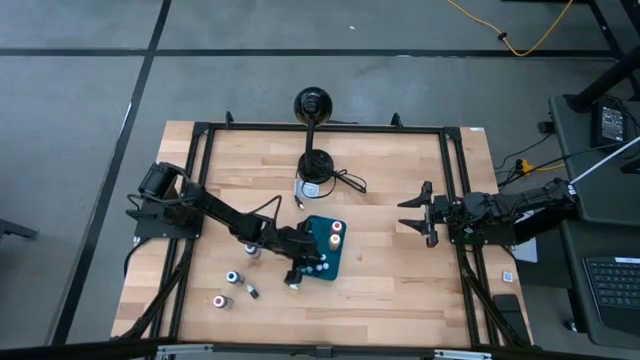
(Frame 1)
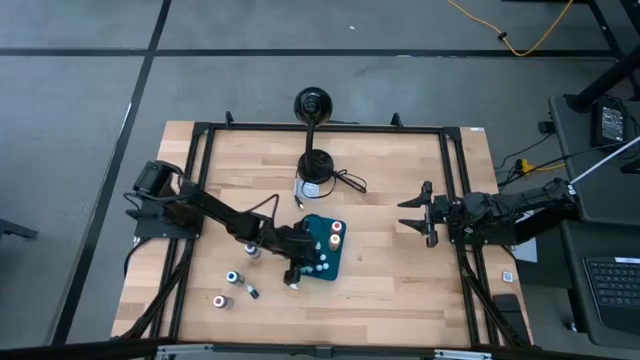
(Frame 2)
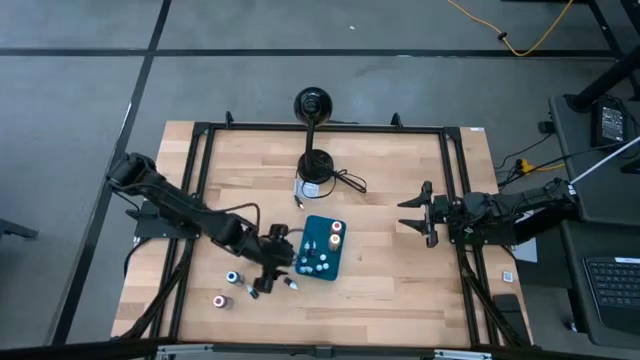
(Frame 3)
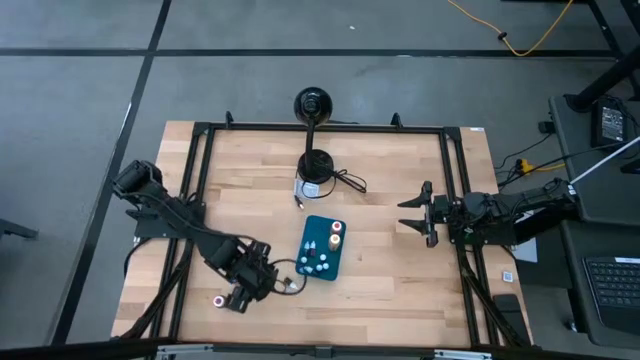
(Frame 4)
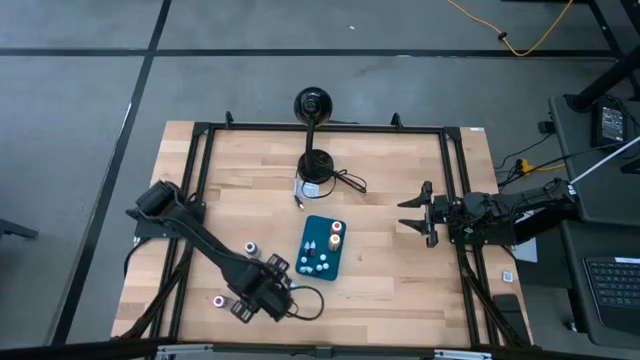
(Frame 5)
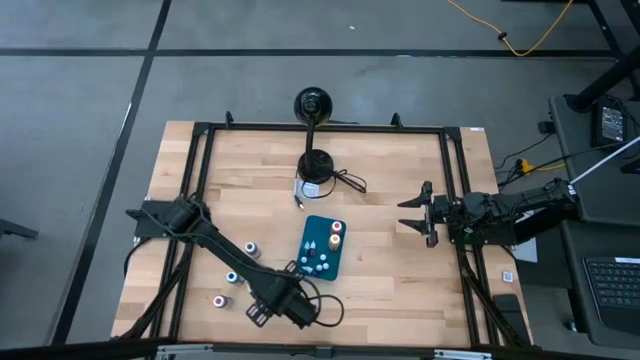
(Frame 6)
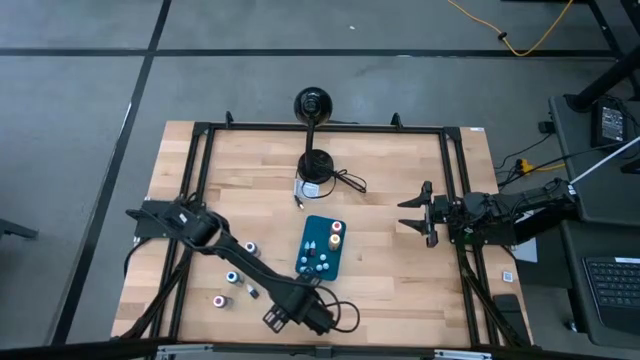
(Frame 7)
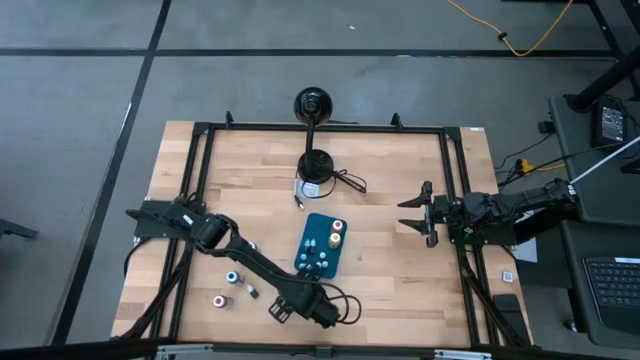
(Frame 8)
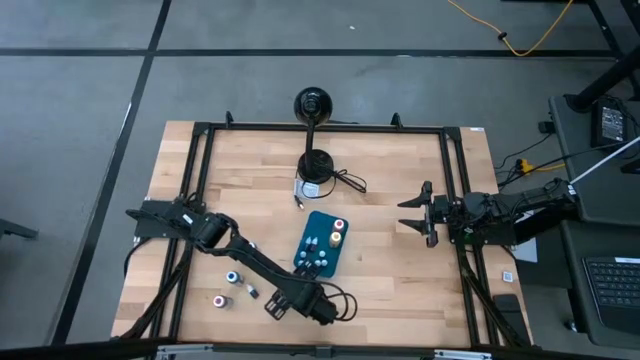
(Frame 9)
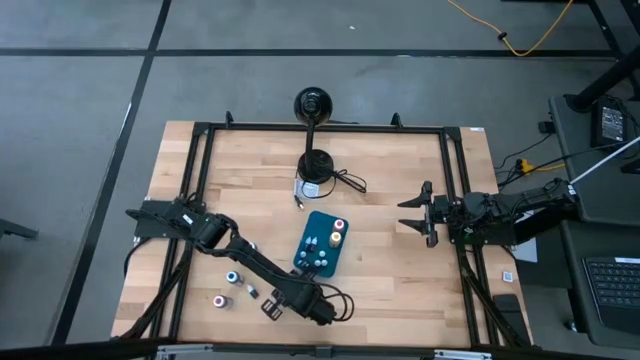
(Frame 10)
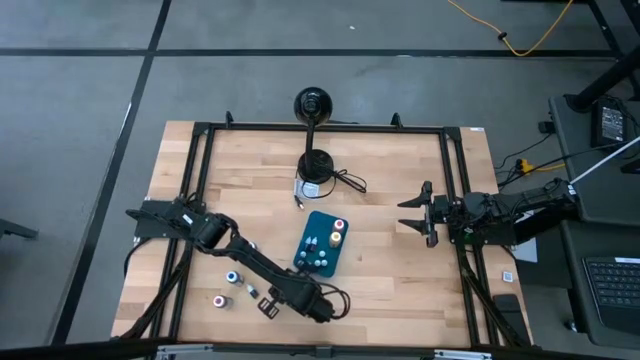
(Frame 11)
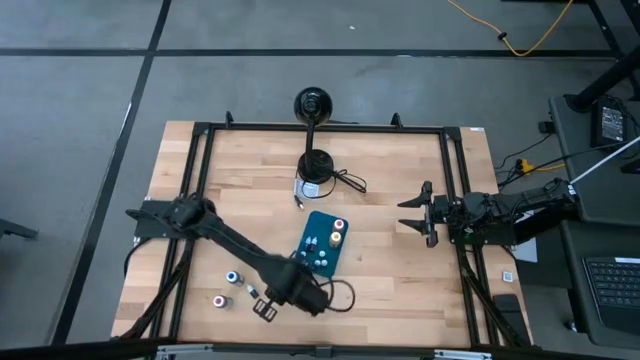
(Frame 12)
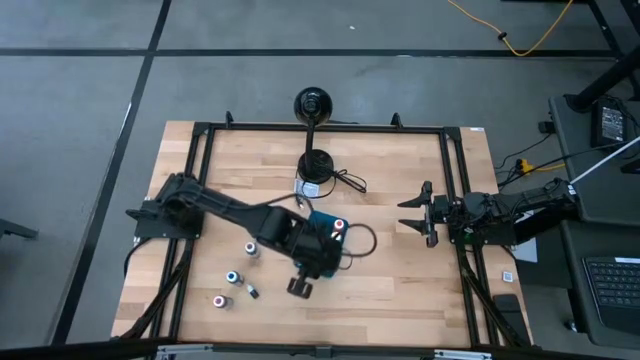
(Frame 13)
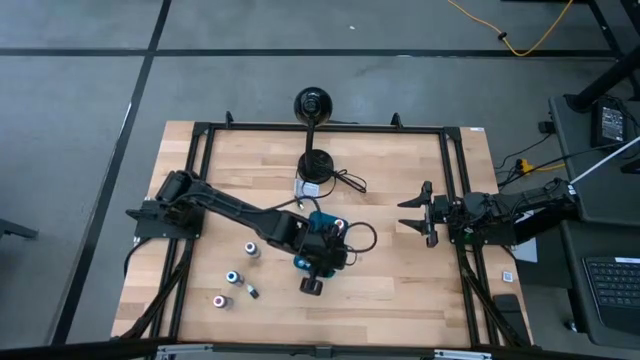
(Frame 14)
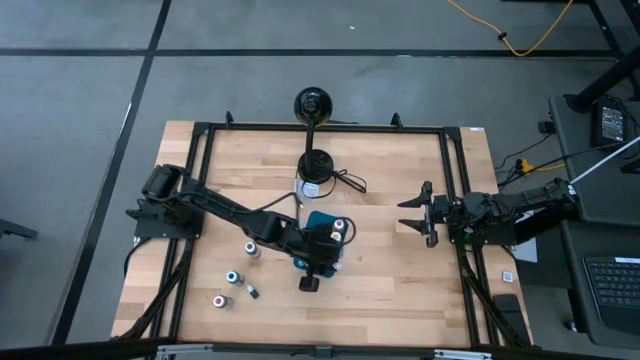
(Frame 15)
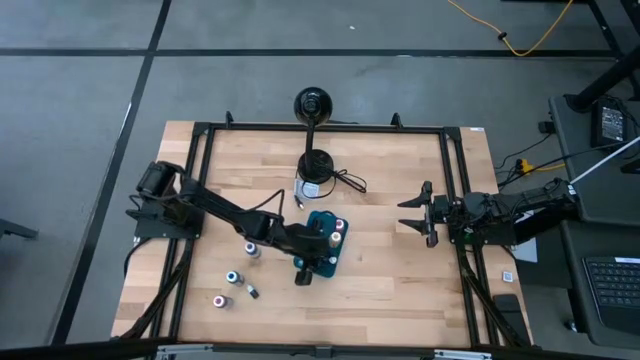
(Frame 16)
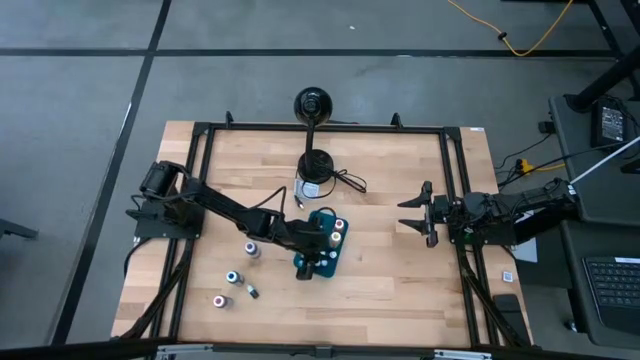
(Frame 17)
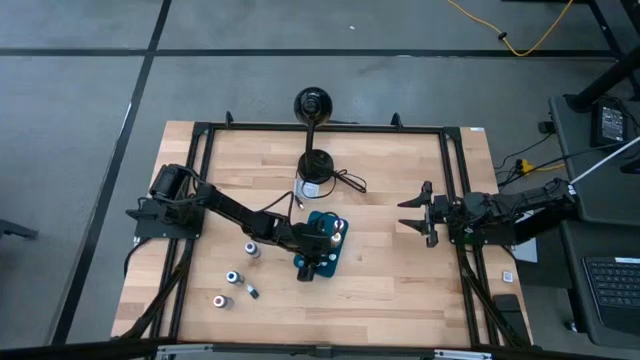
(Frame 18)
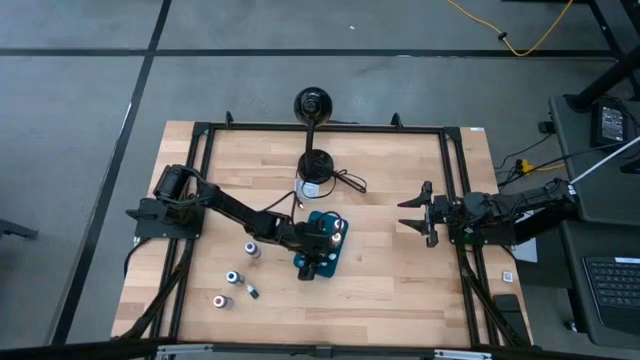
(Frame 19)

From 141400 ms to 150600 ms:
Task: Pick & Place food coloring
Put the right green small food coloring bottle into the bin

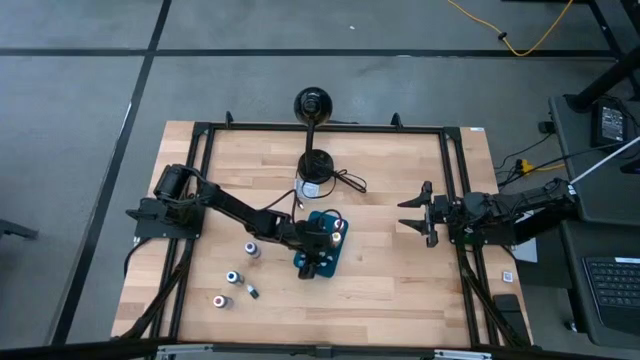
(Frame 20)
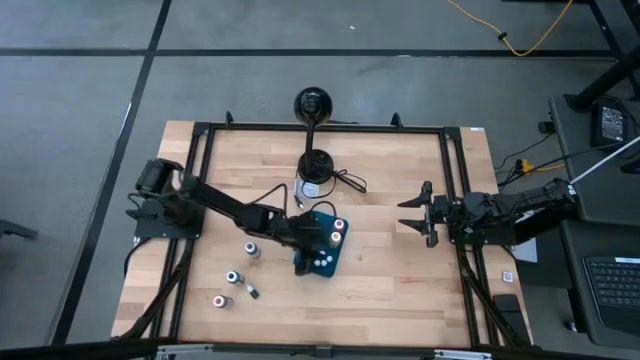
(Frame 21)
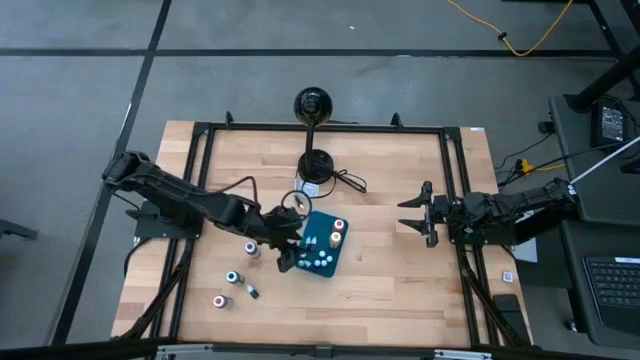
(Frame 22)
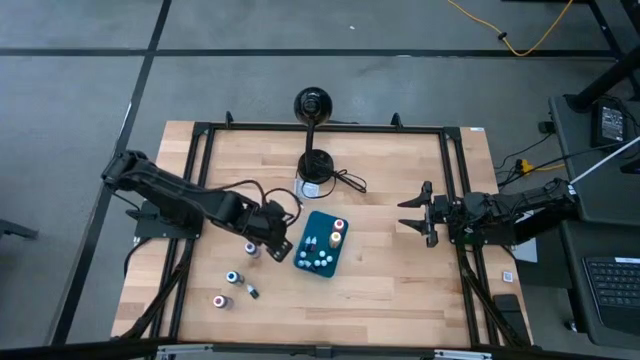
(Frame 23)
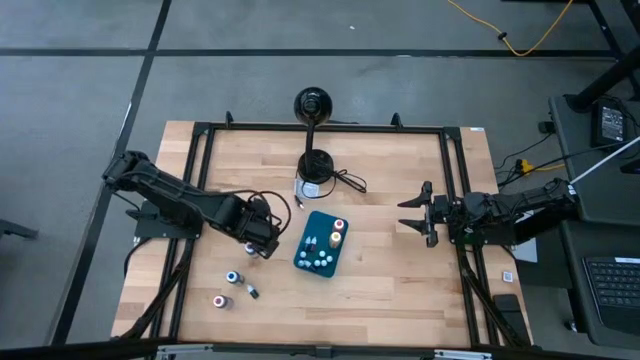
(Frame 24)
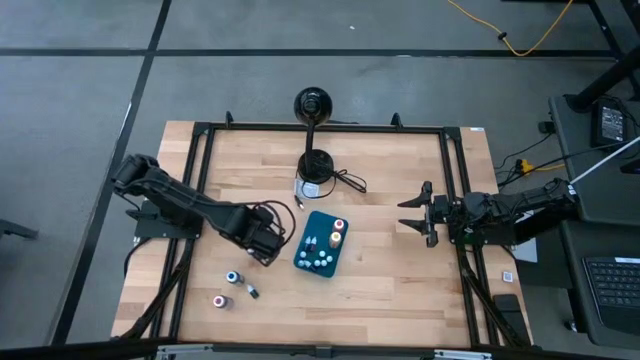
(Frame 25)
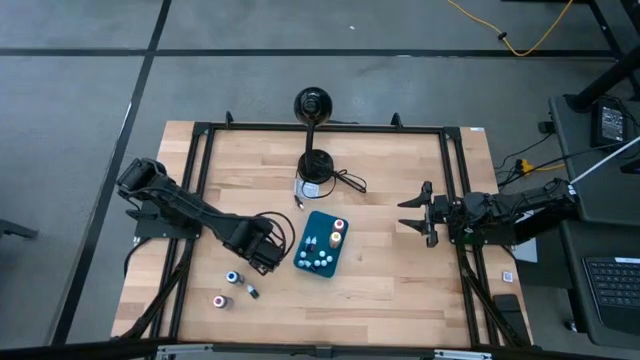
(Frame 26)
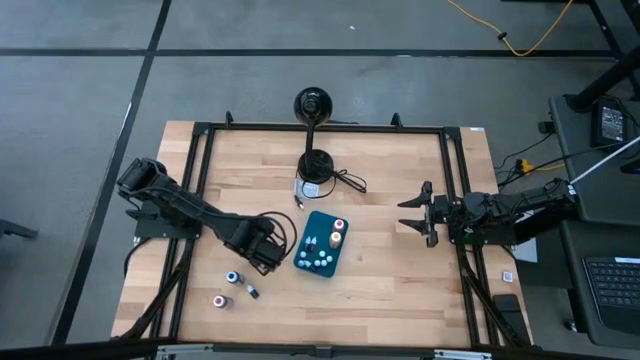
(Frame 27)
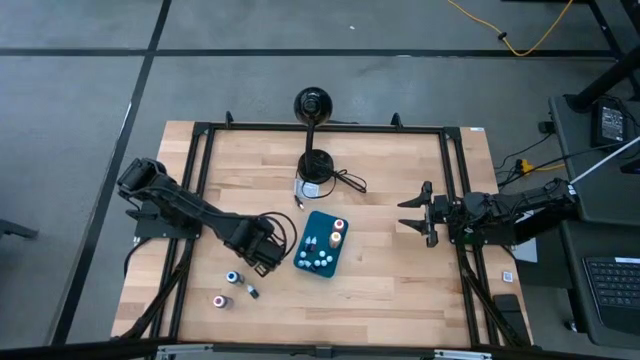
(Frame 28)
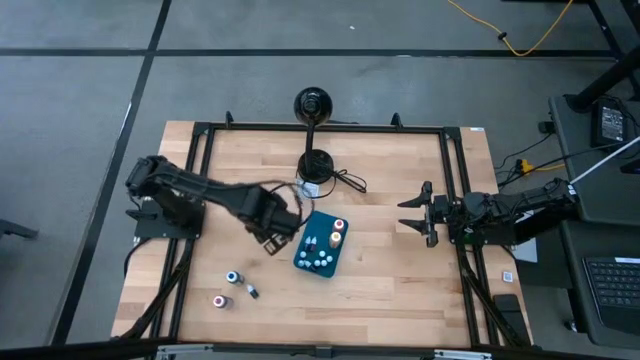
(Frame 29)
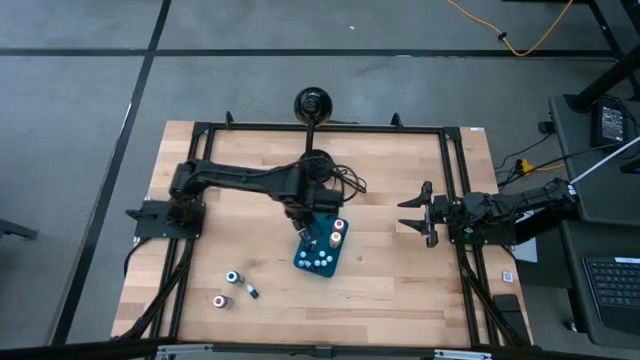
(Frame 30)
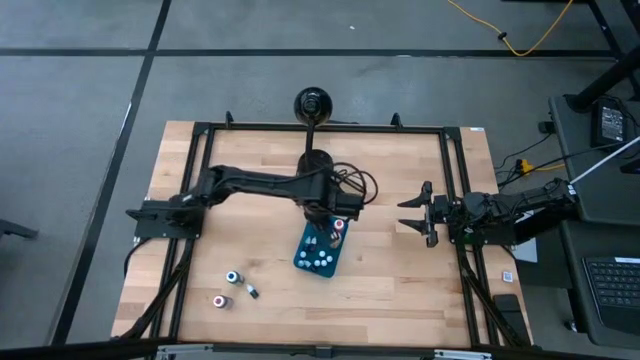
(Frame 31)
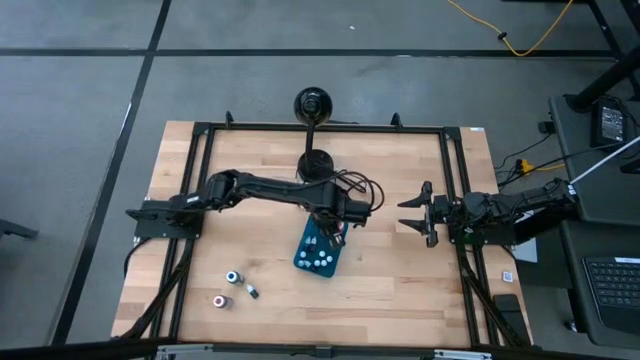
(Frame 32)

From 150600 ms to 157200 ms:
Put the purple big food coloring bottle into the bin

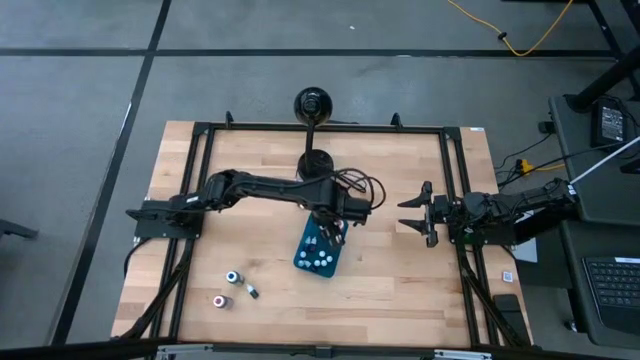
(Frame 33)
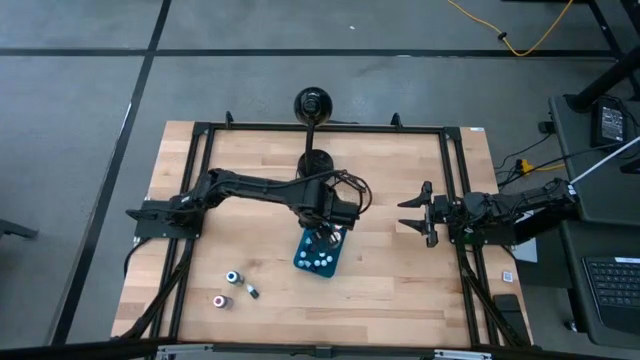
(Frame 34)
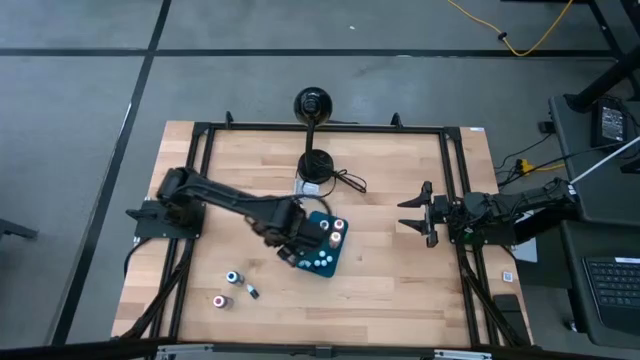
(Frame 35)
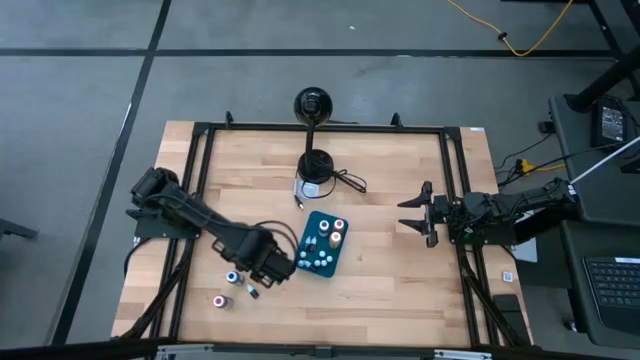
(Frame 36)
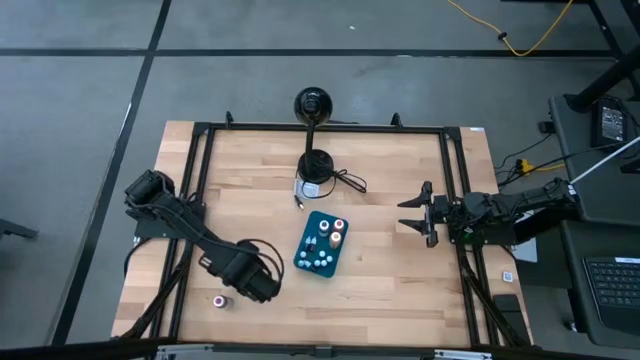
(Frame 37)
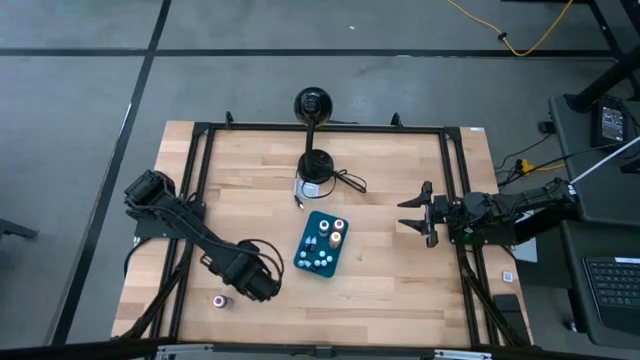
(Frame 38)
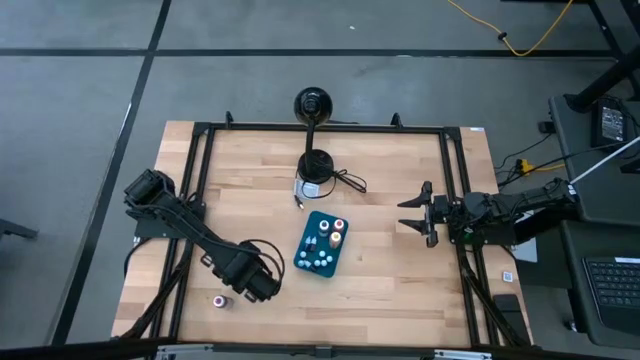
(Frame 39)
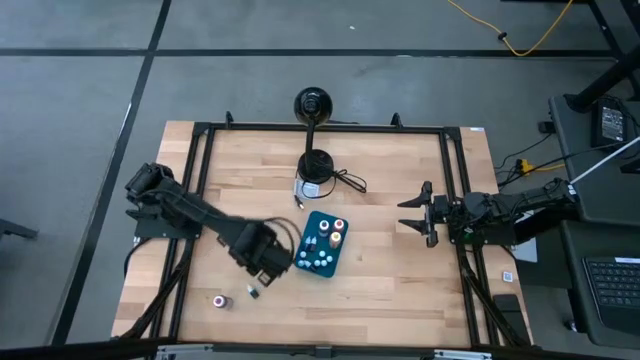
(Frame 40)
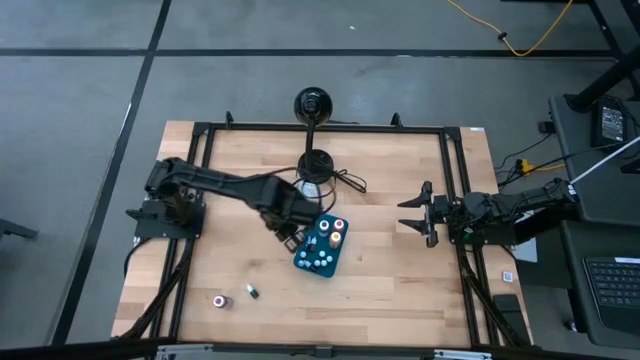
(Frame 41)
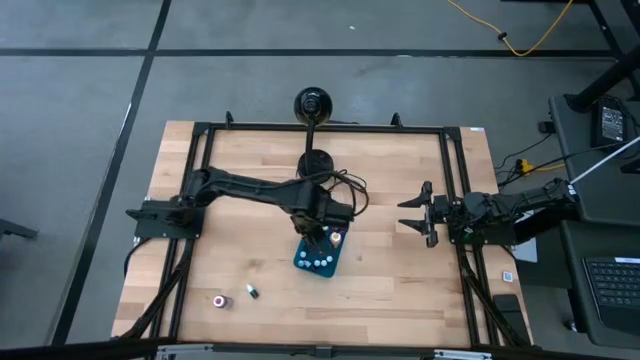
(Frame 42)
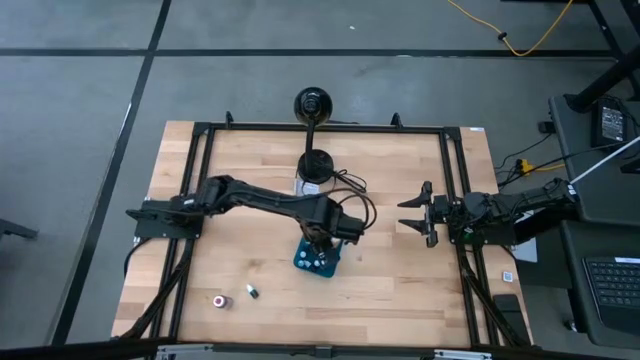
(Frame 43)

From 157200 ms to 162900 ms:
Put the blue big food coloring bottle into the bin
